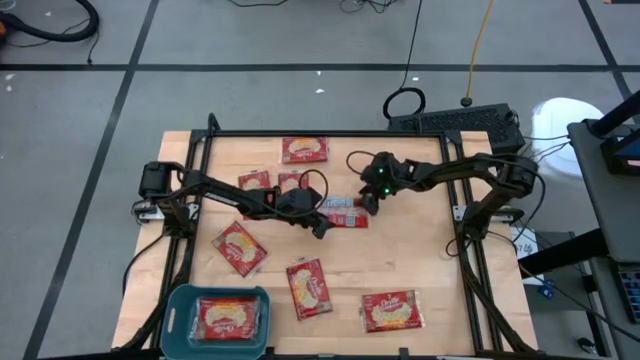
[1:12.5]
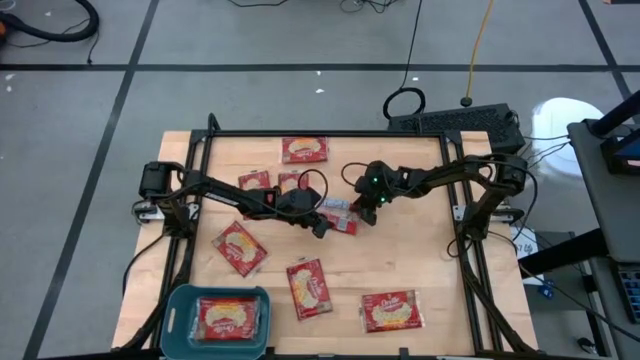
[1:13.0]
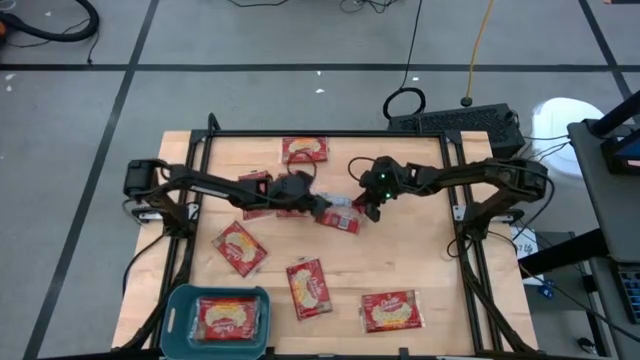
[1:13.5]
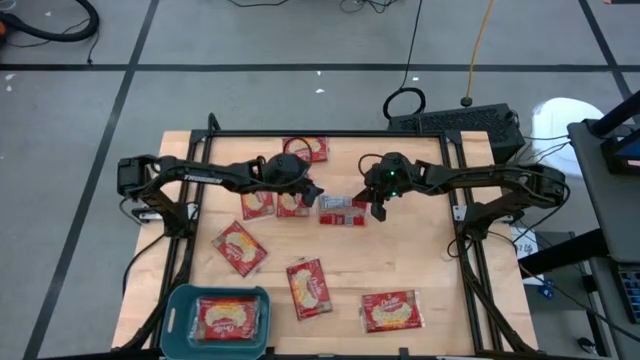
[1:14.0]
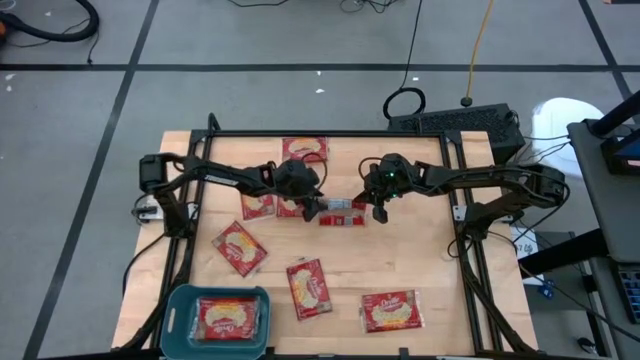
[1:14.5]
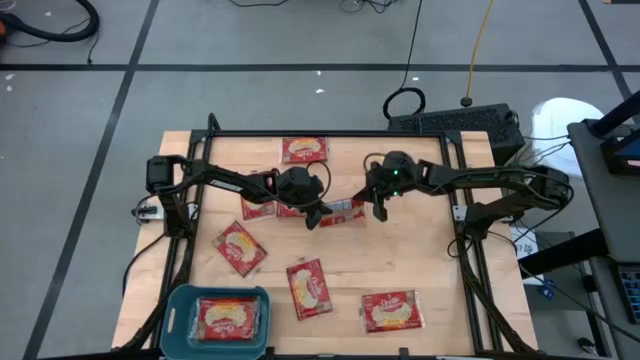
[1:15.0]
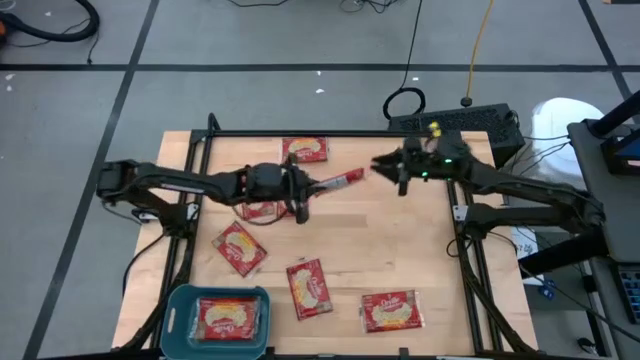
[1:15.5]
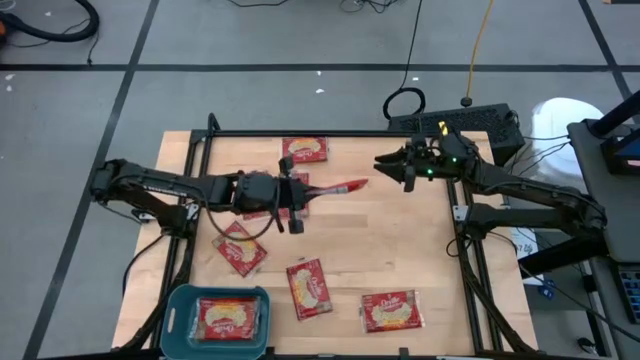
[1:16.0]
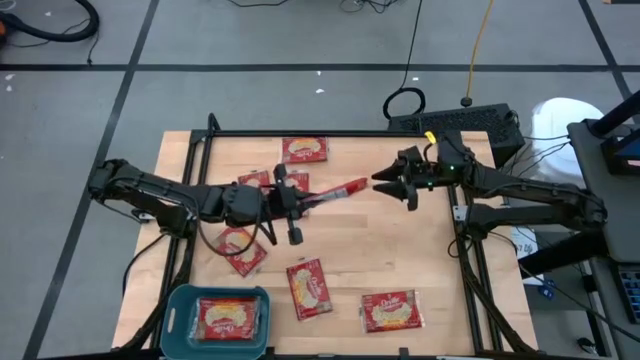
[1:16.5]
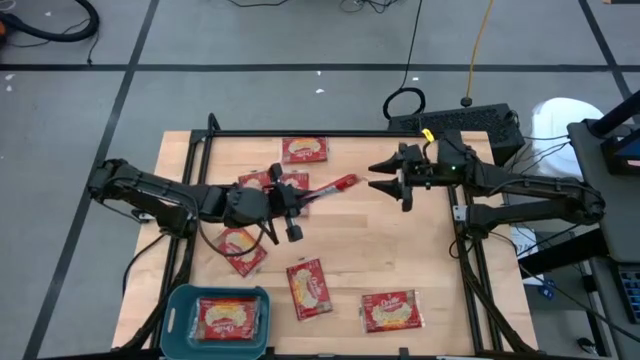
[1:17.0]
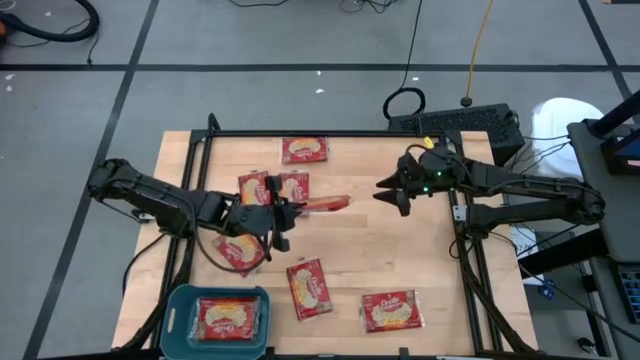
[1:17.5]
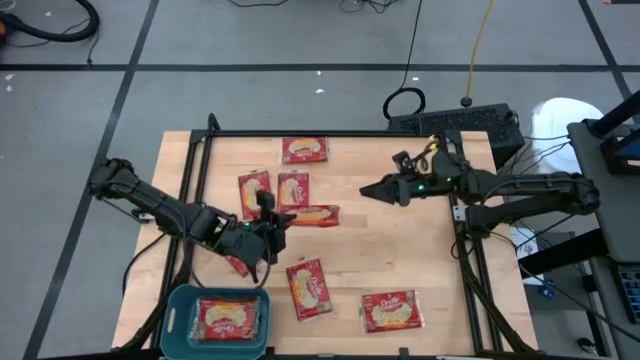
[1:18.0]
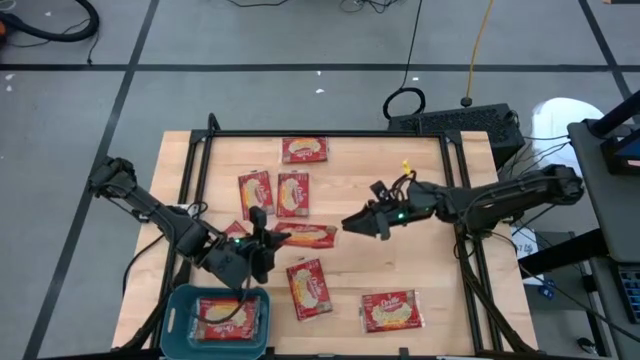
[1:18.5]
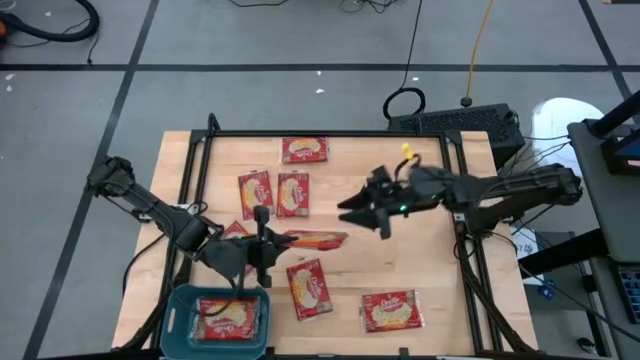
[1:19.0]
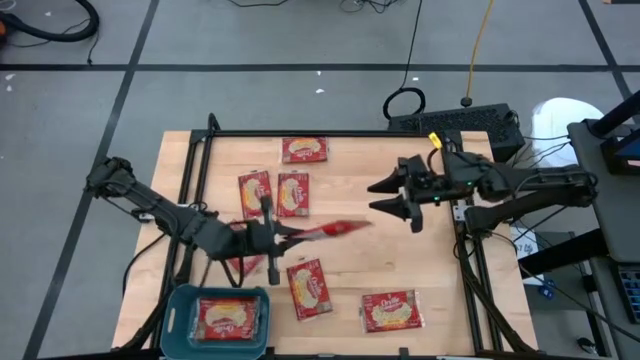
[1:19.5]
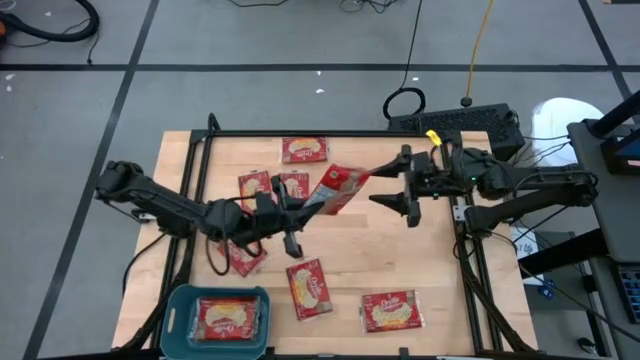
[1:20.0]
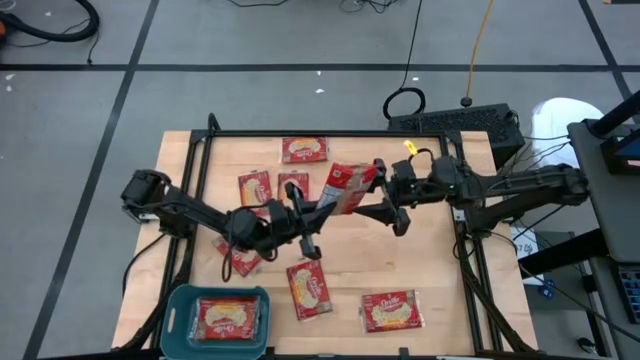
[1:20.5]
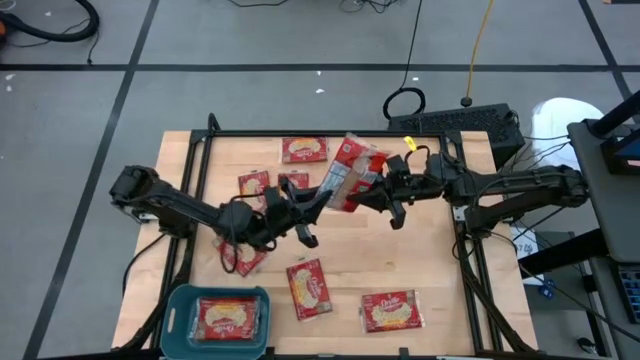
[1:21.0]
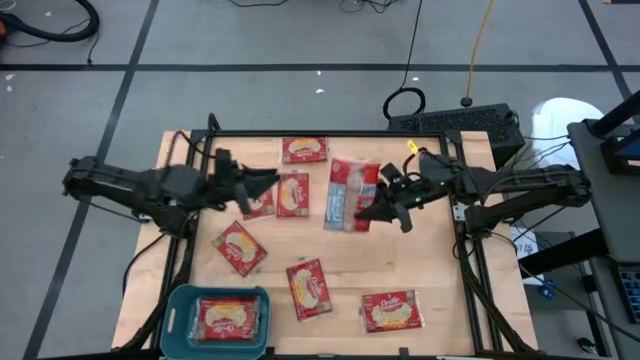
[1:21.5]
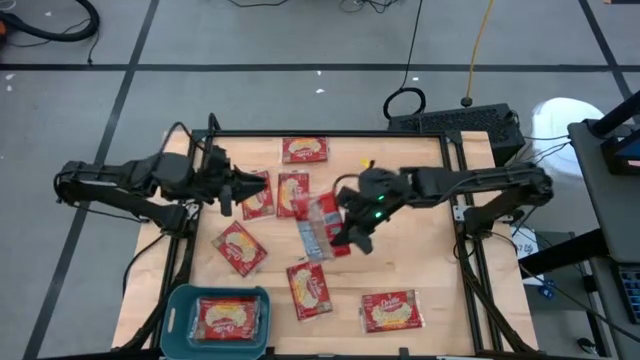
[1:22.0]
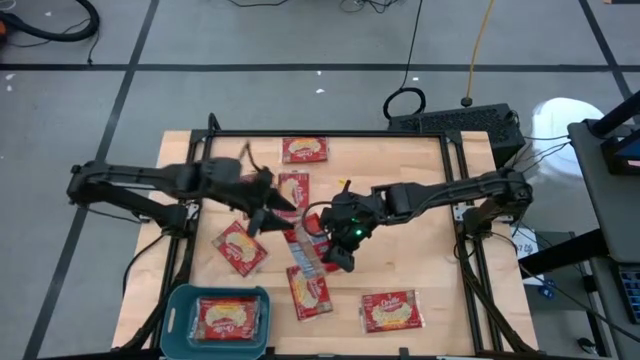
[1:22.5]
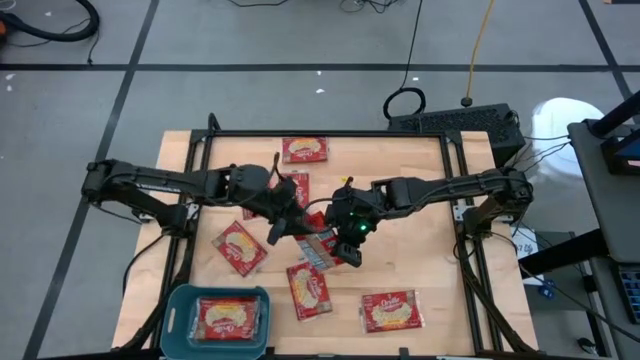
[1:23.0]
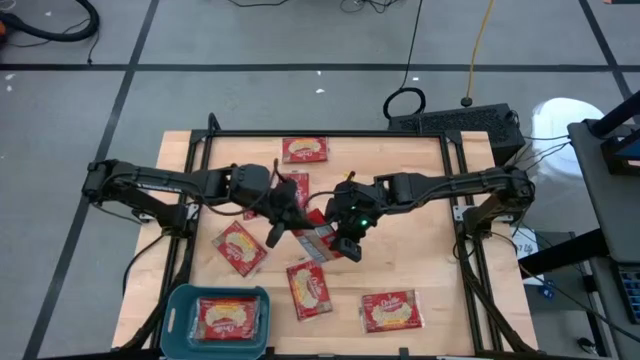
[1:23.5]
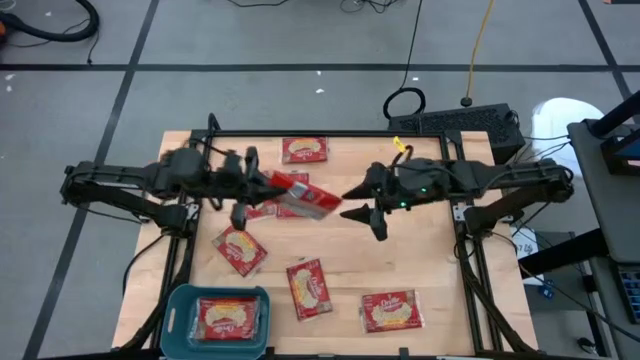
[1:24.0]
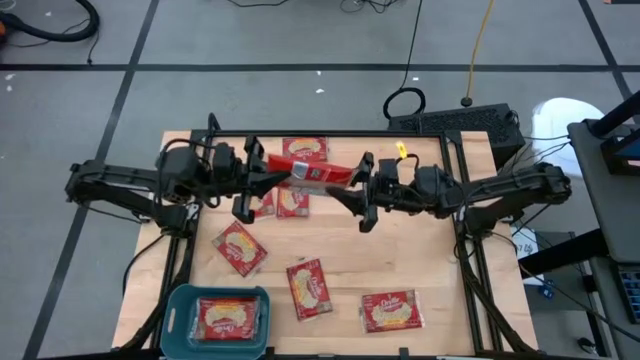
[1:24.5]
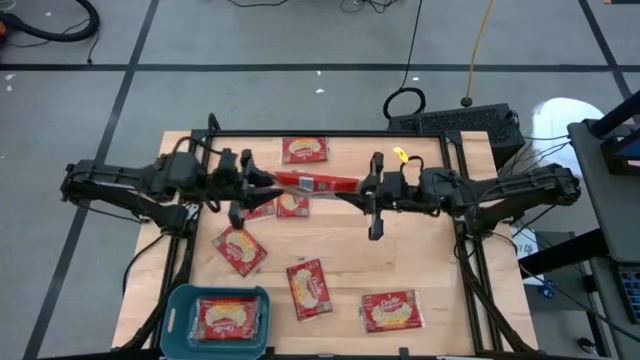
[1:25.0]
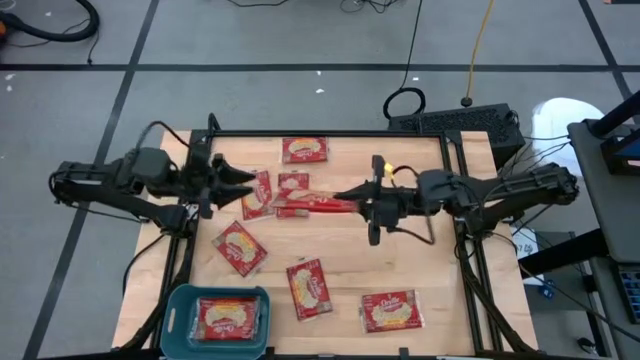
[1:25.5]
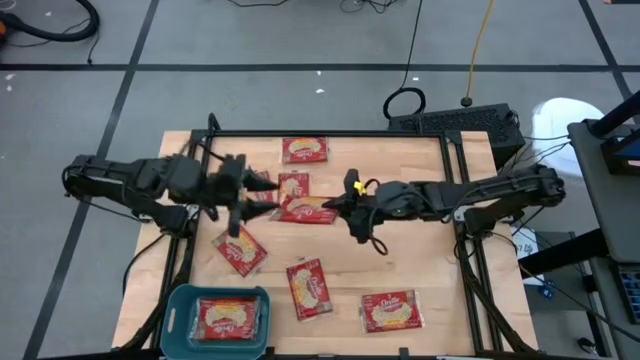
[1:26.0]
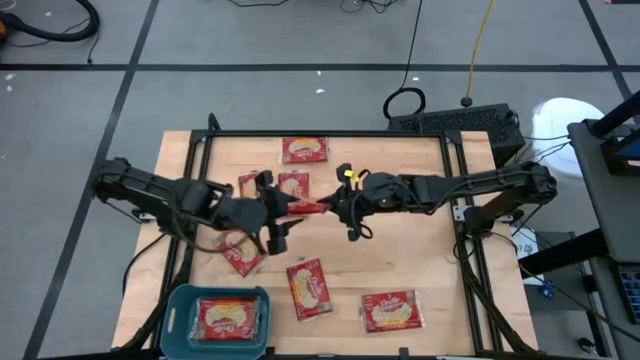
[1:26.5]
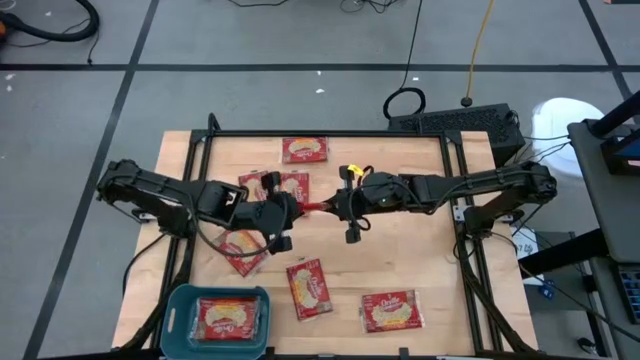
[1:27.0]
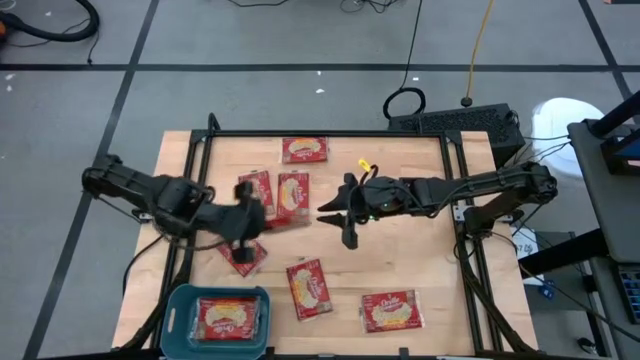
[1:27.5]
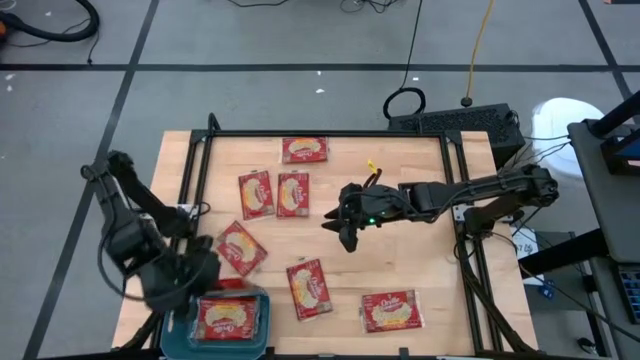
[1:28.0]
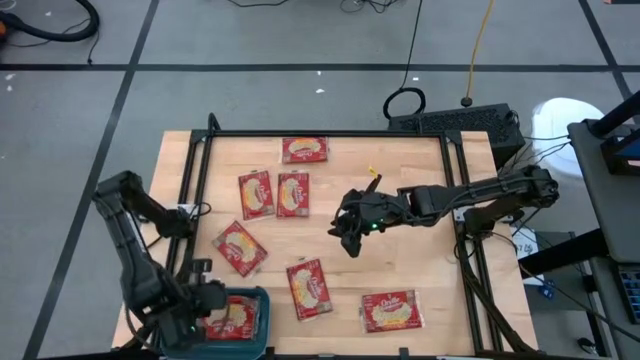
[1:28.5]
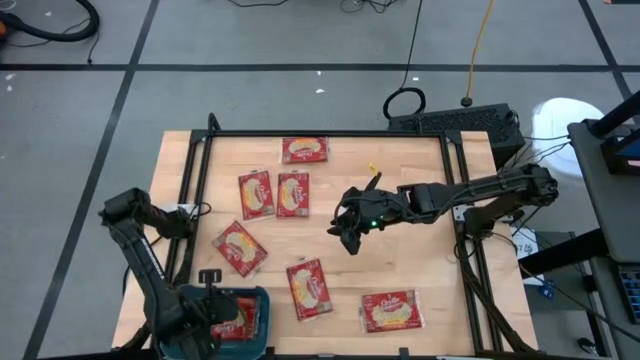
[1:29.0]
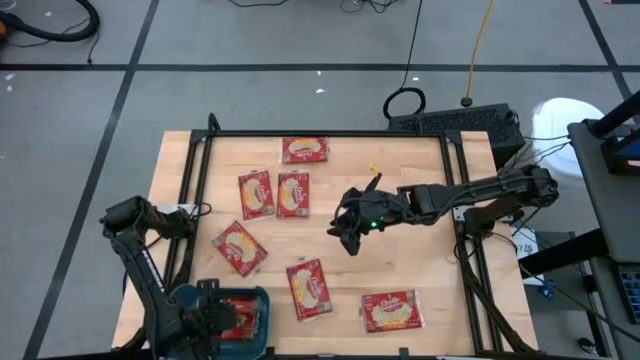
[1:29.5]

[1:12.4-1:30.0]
Task: Sort popcorn bags into baskets
Put the popcorn sachet into the bin
